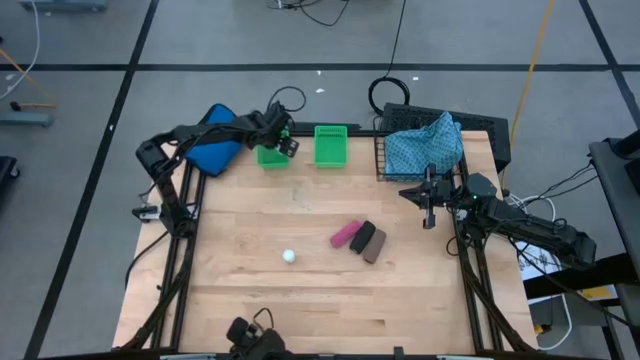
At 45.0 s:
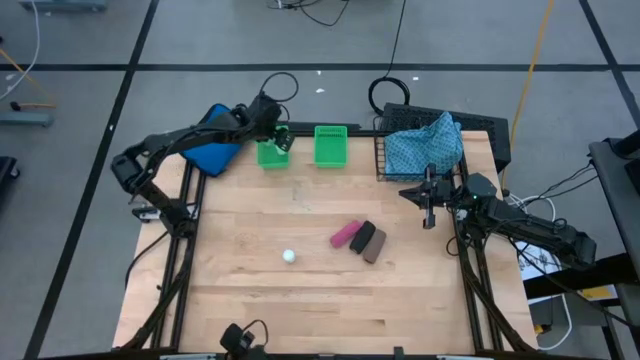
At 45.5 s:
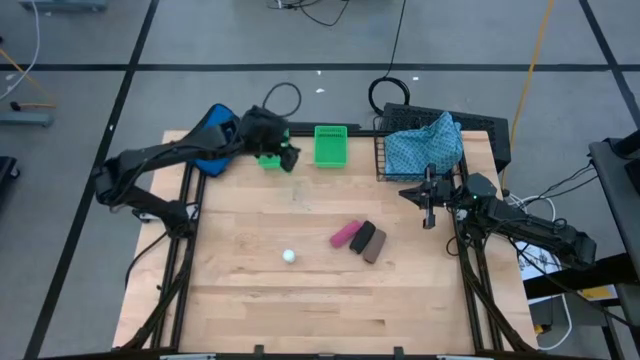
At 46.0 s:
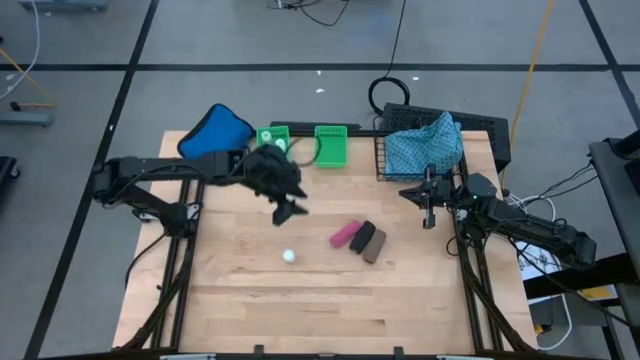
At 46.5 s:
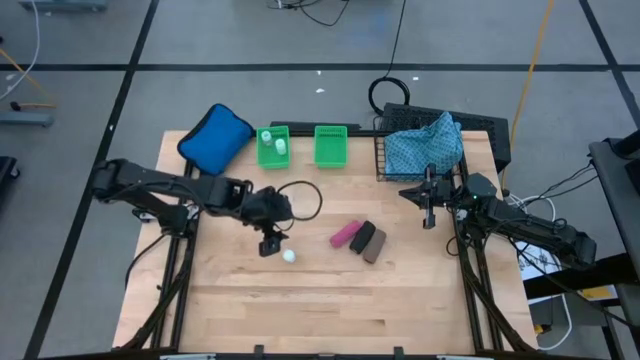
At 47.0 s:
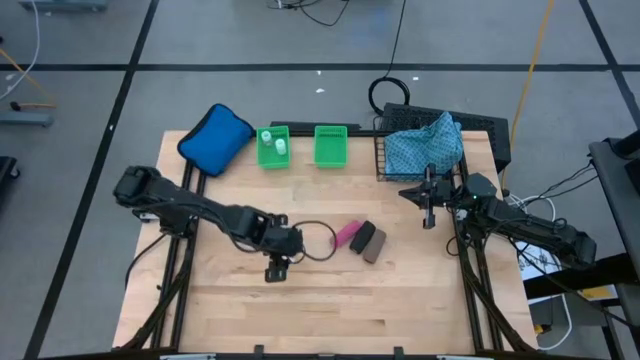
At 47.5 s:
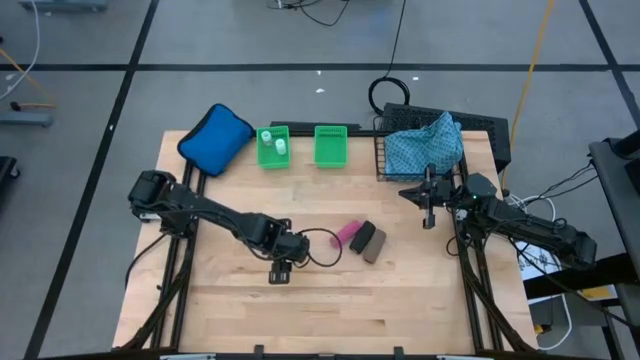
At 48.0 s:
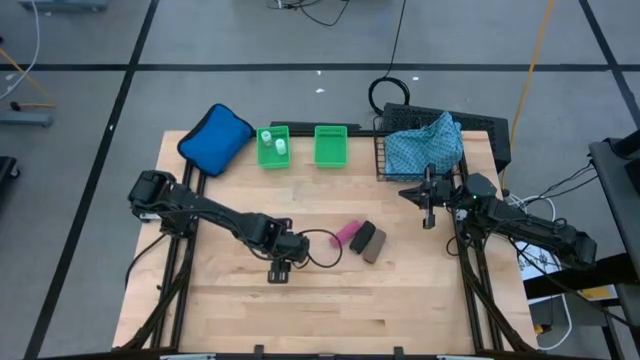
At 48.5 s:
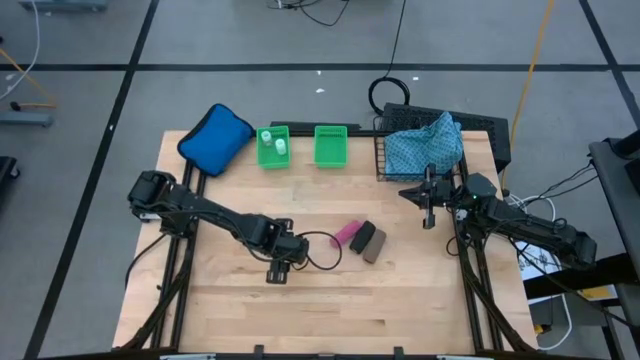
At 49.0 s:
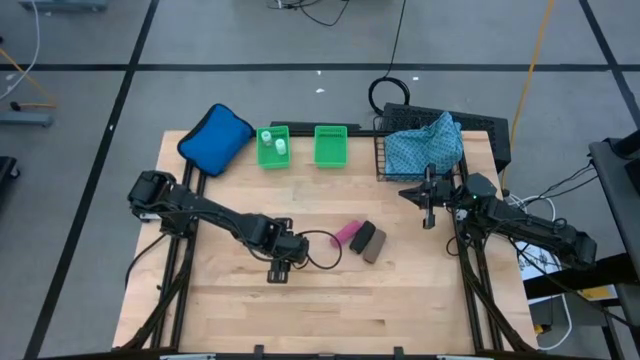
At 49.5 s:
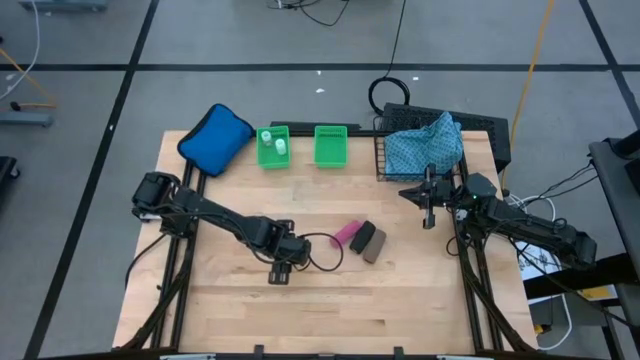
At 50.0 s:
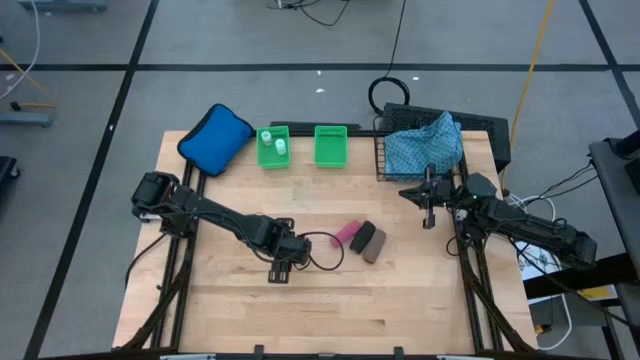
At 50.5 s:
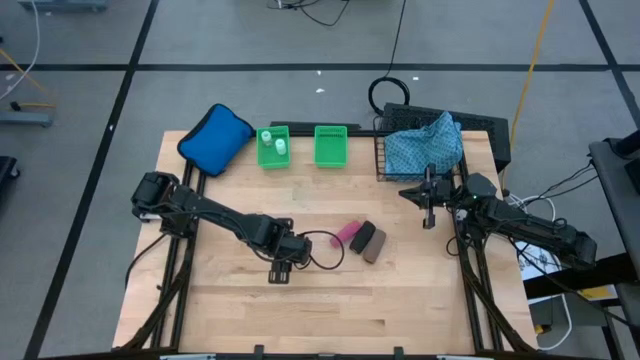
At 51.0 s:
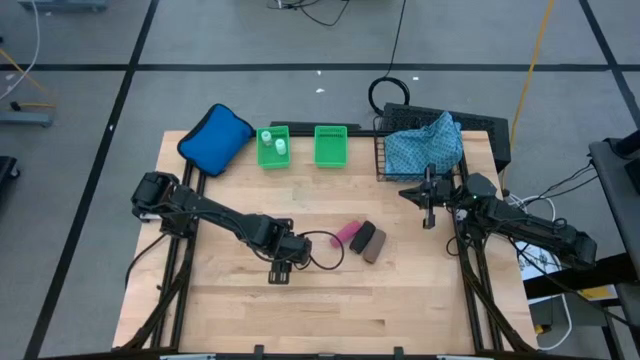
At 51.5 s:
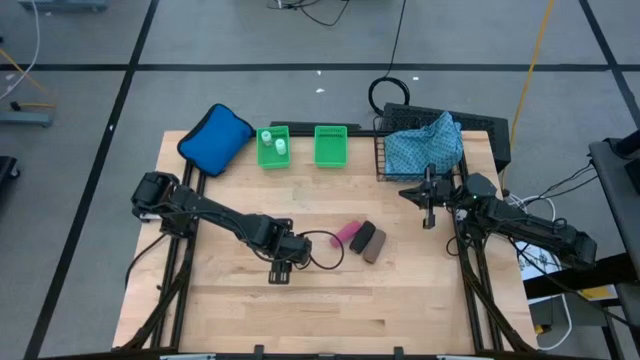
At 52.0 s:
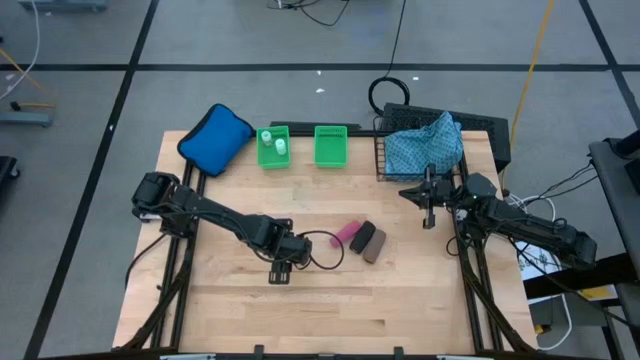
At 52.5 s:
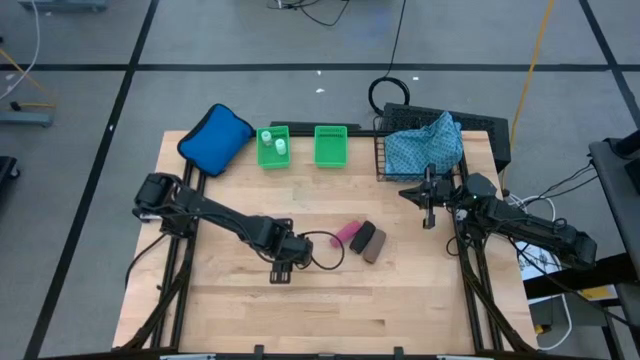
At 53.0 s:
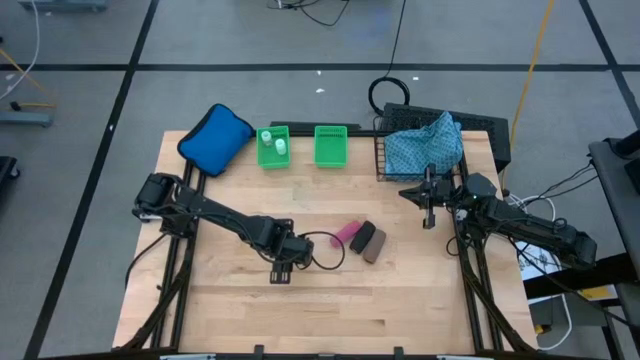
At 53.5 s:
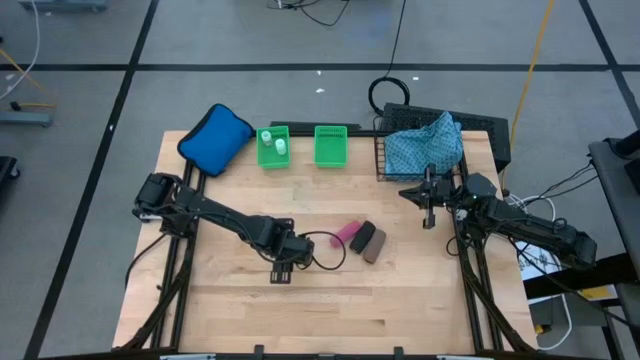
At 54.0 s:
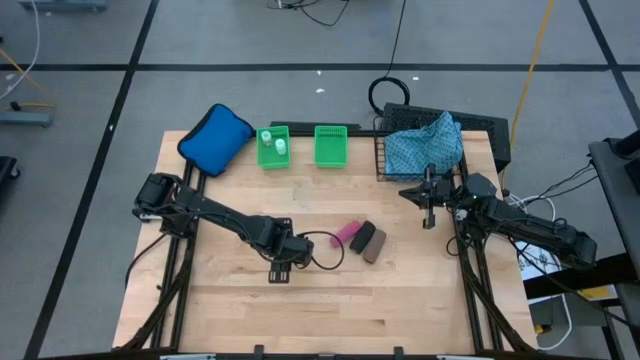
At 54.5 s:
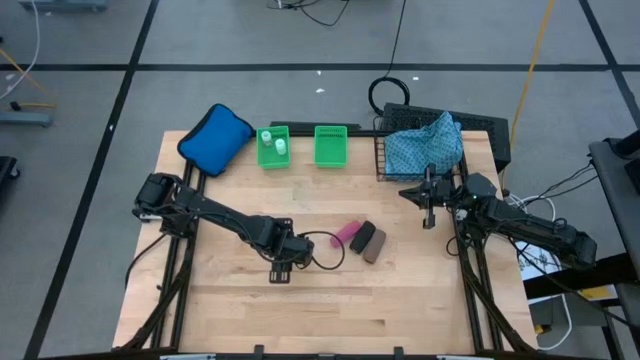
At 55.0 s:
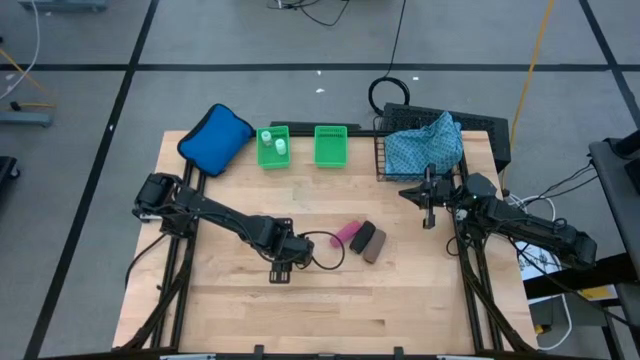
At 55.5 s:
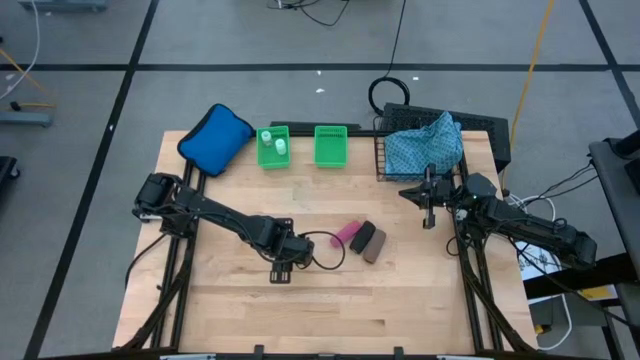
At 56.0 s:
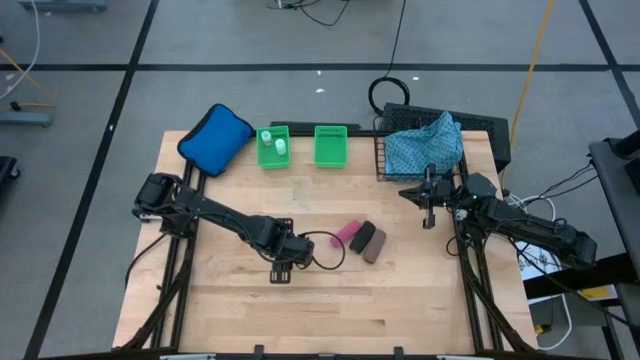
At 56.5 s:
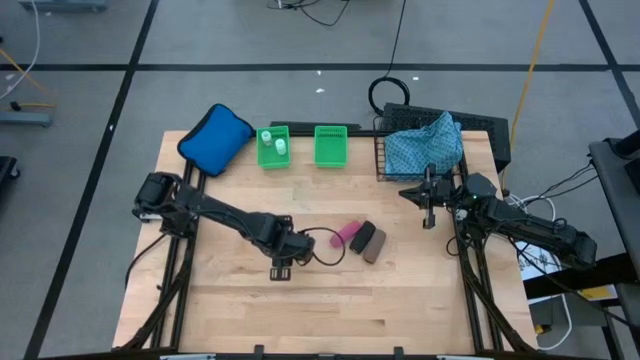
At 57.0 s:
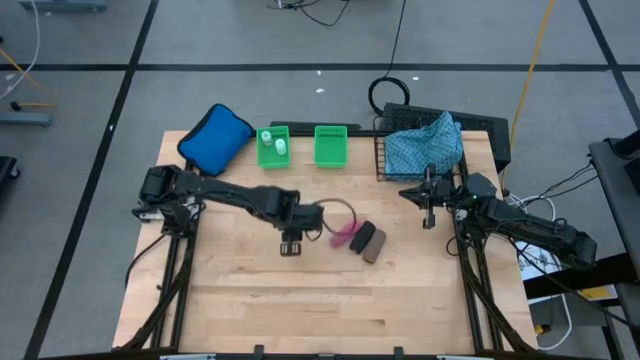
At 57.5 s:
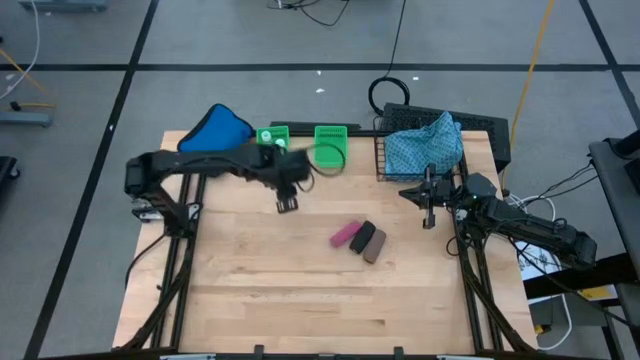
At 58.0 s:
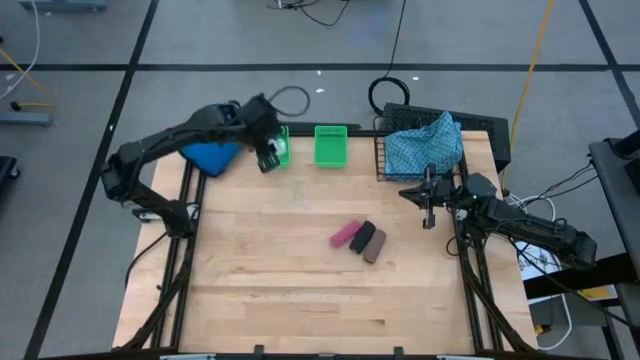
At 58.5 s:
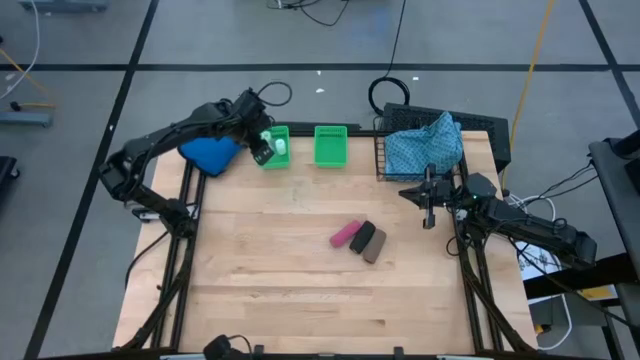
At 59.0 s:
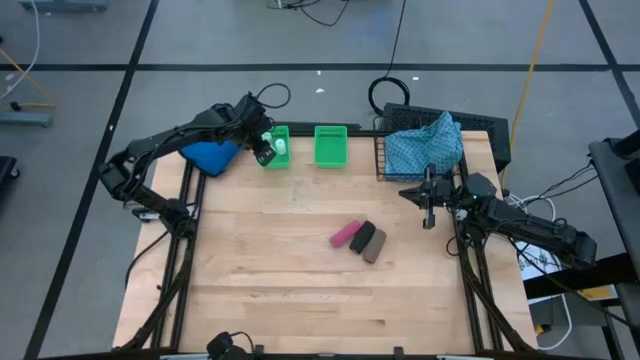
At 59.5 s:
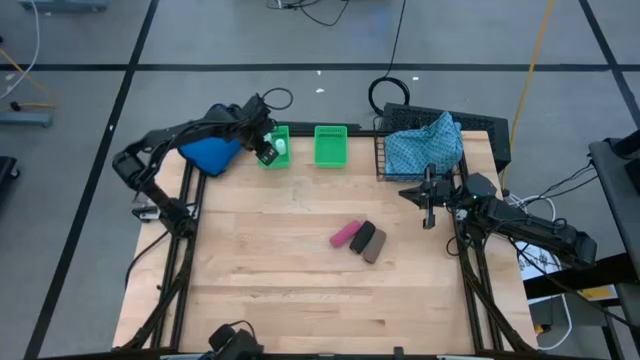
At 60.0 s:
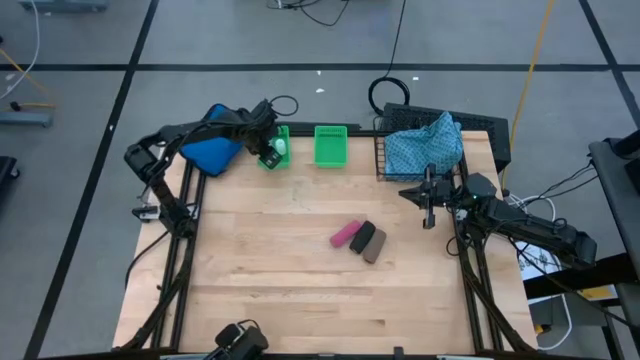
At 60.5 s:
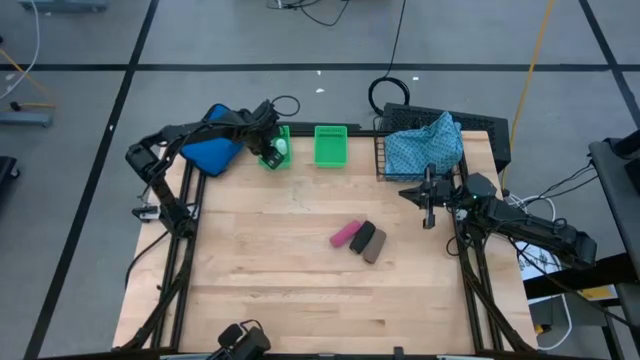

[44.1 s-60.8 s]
Task: Pick & place medical supplies in basket/bin
Put the white pill bottle into the left green bin

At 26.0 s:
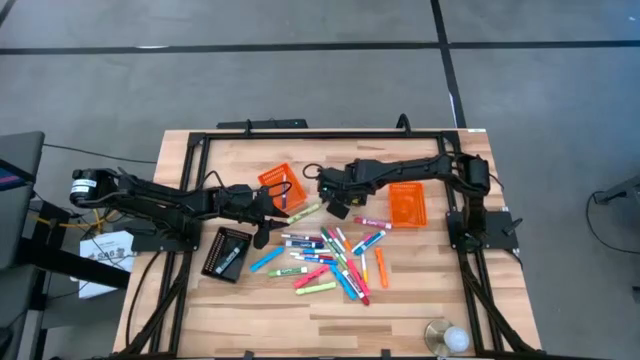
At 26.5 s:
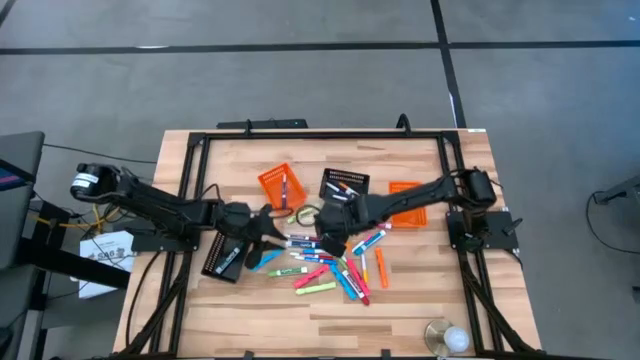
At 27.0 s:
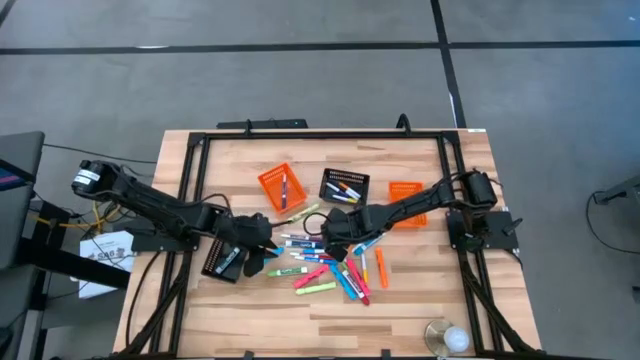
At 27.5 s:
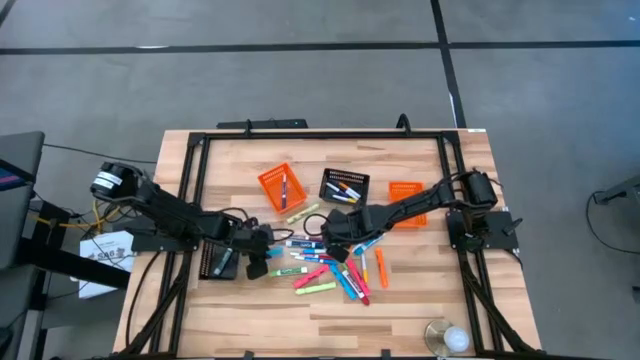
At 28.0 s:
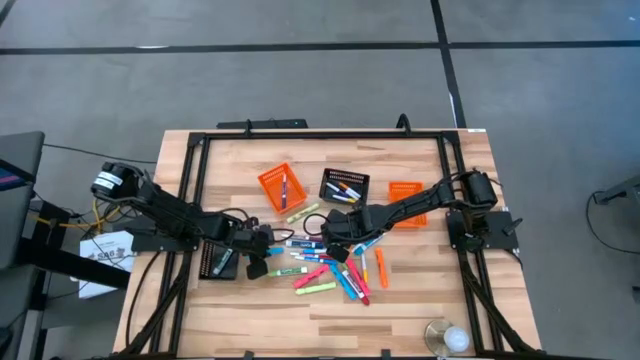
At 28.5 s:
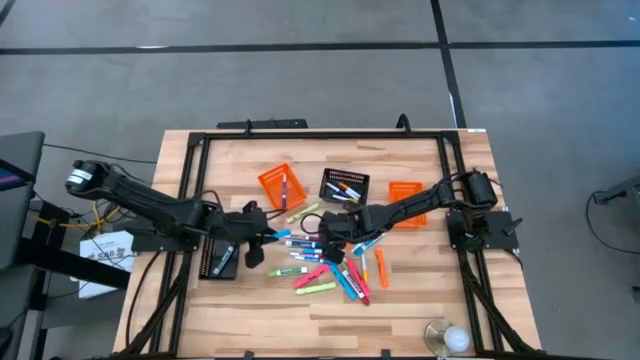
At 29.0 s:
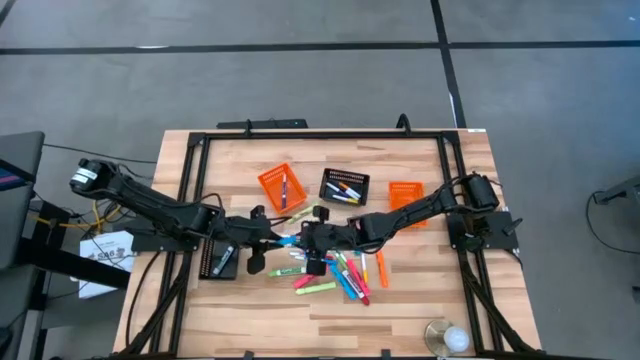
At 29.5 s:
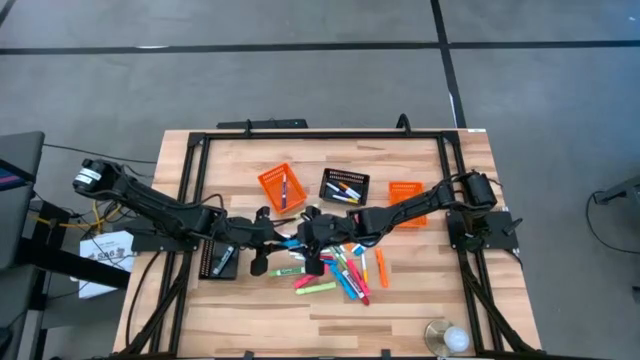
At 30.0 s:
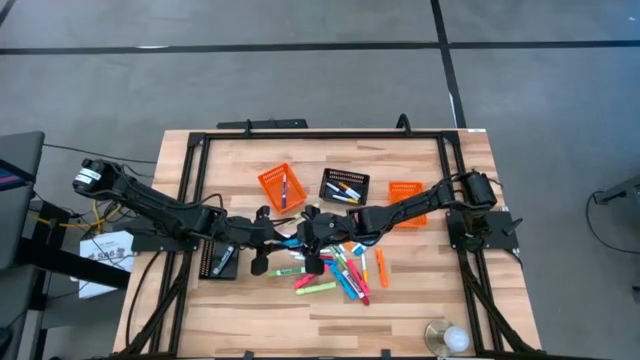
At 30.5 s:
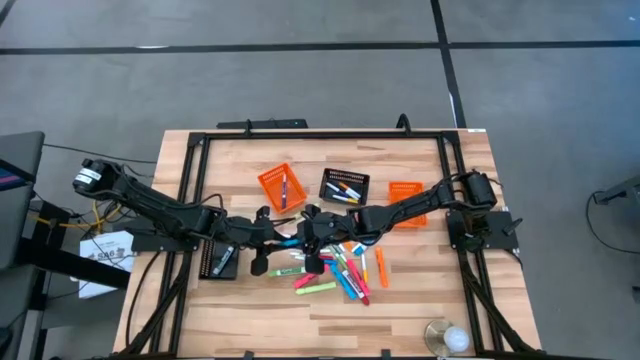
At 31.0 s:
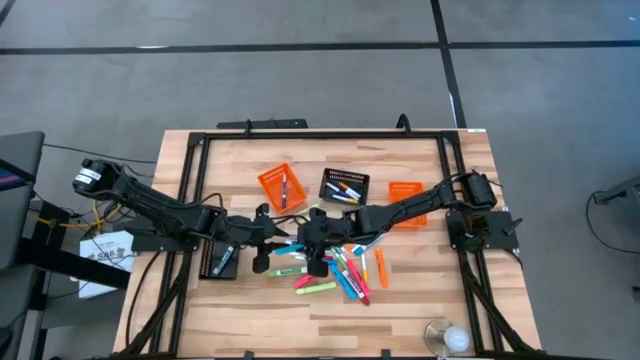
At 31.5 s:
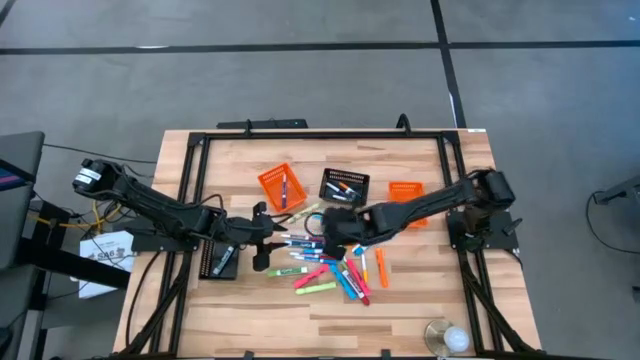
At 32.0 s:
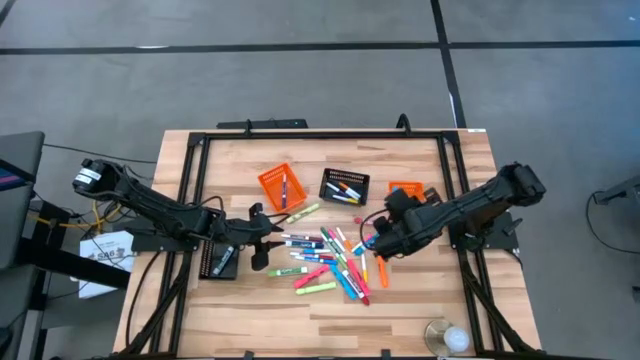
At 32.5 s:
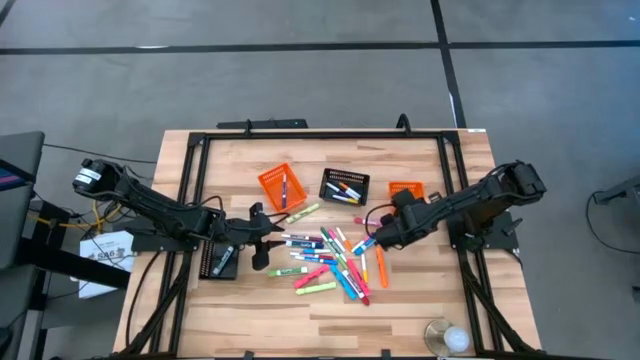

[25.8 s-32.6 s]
Task: Pick & Place Markers
Put the blue highlighter into the right orange bin
